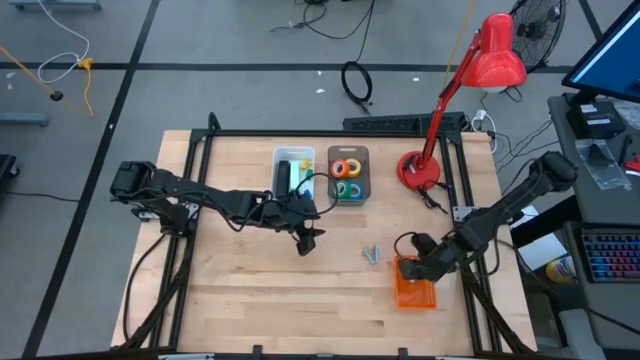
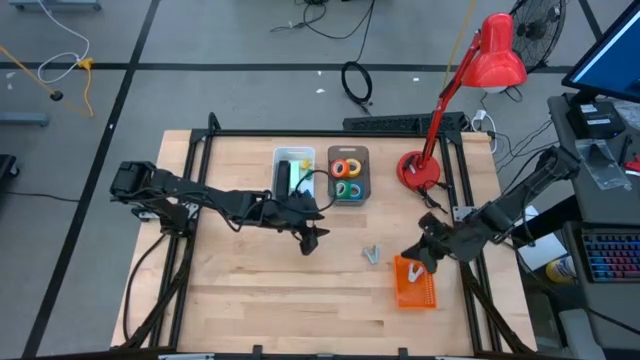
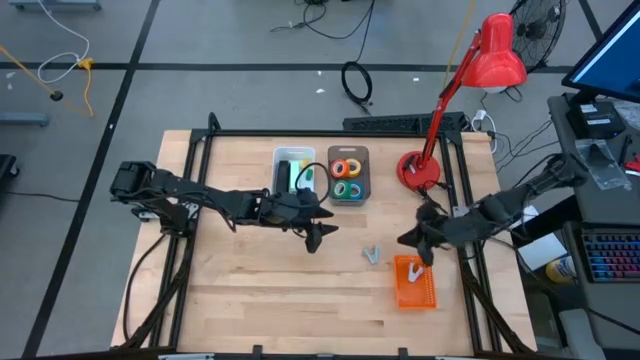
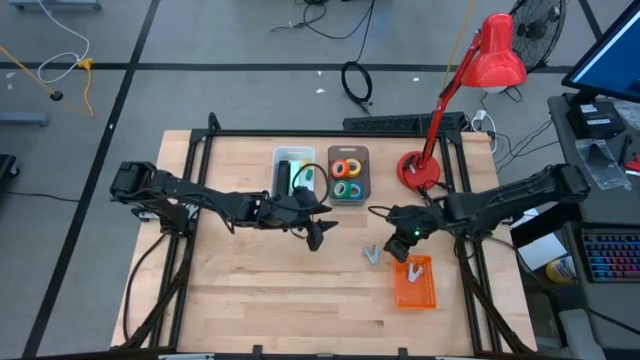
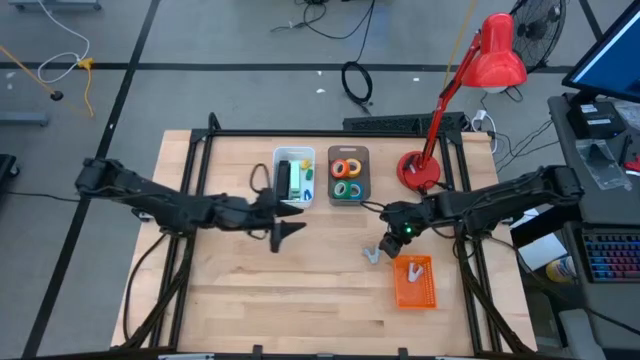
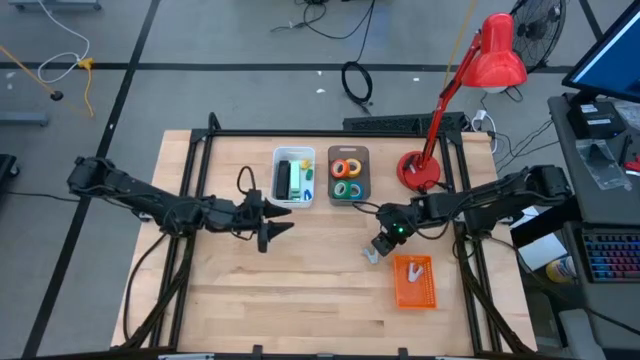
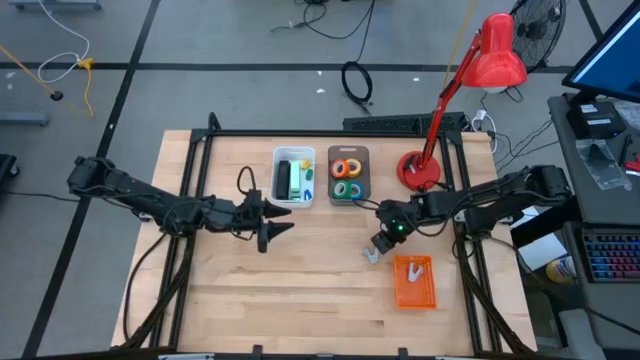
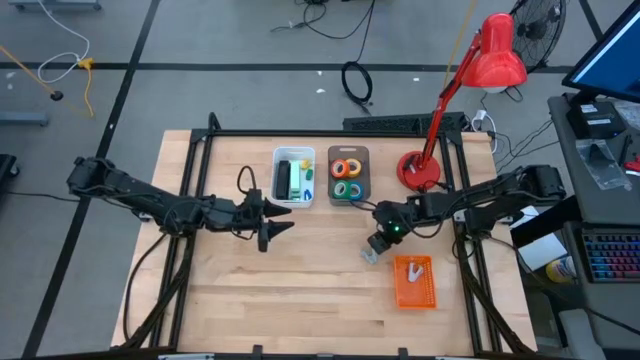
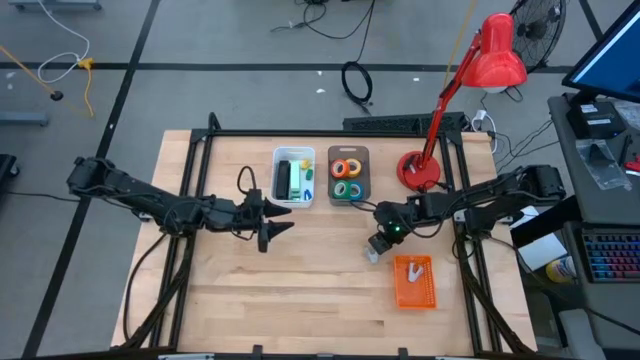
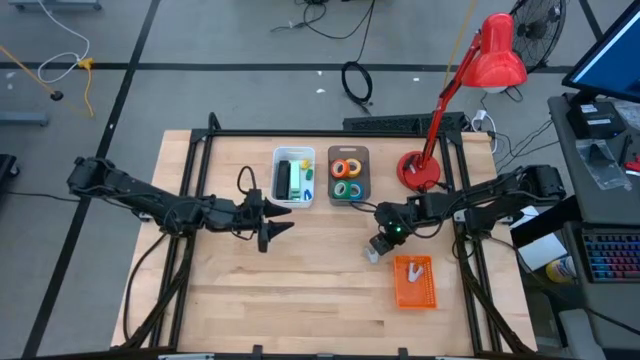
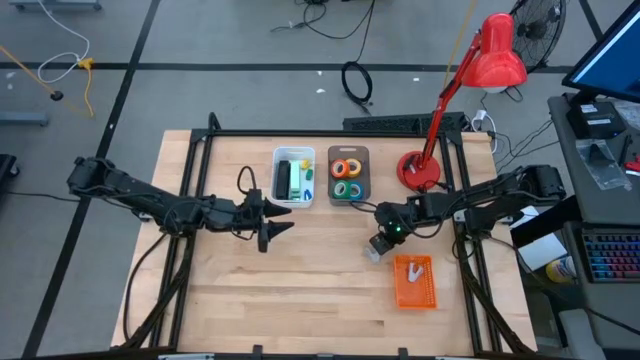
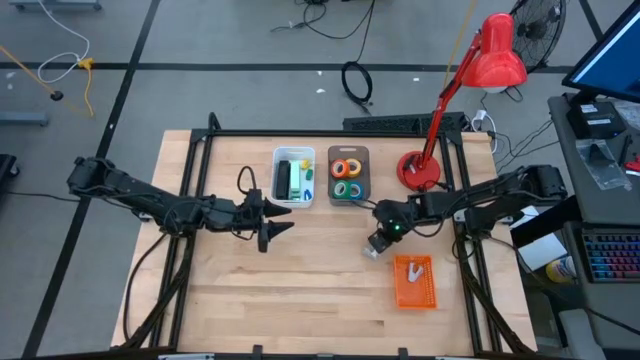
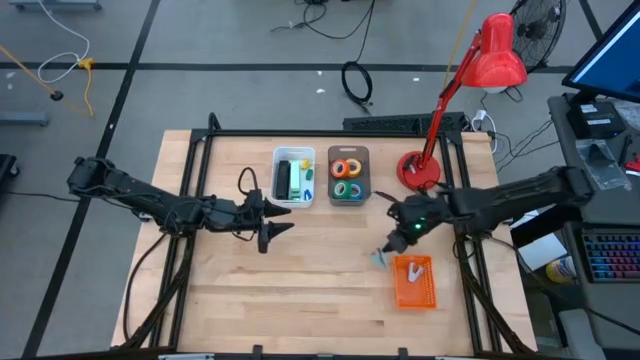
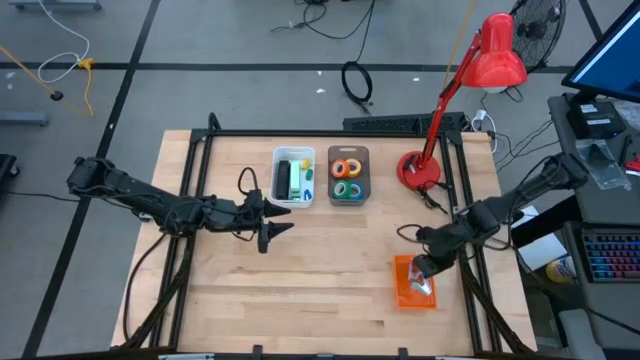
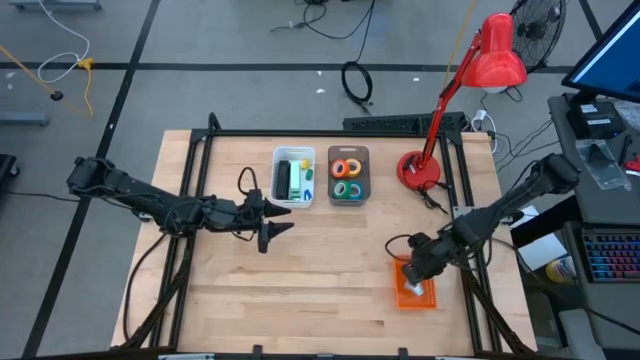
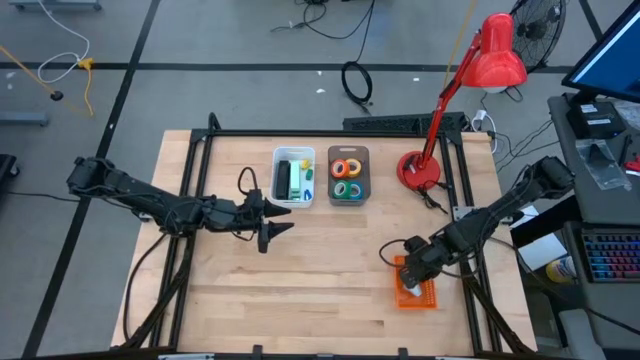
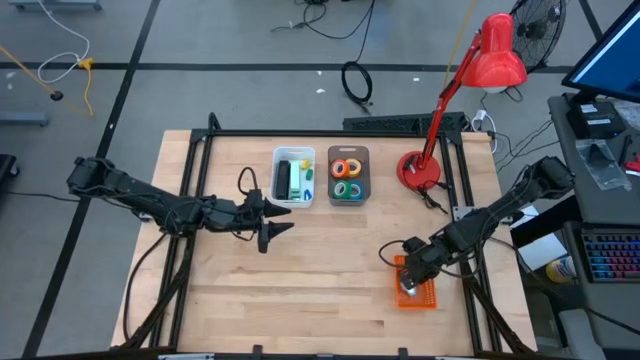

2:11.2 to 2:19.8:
Task: Pick and place Stapler, Stapler remover, tape
Put the blue staple remover into the orange bin

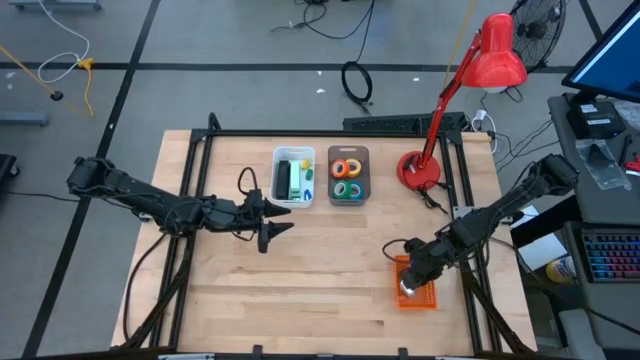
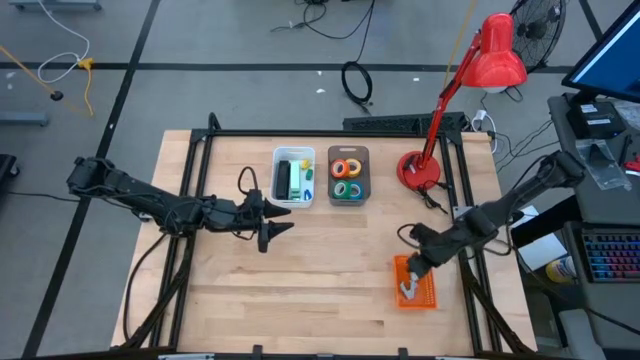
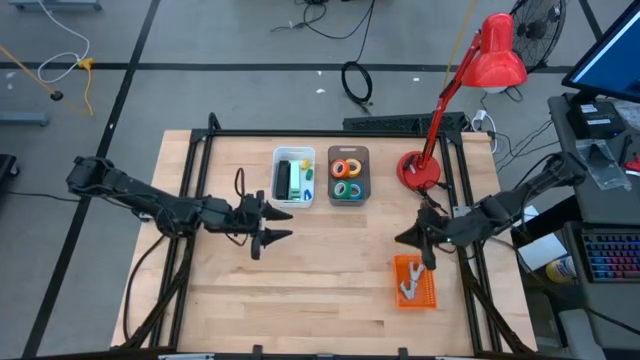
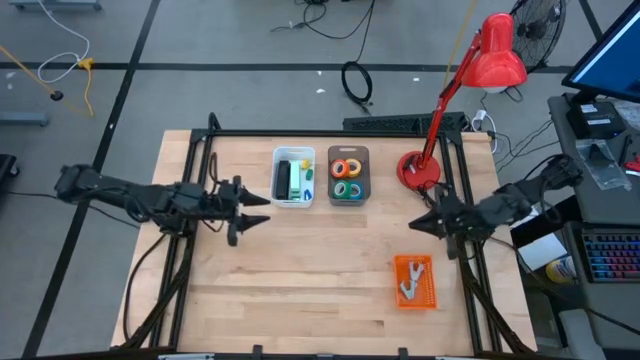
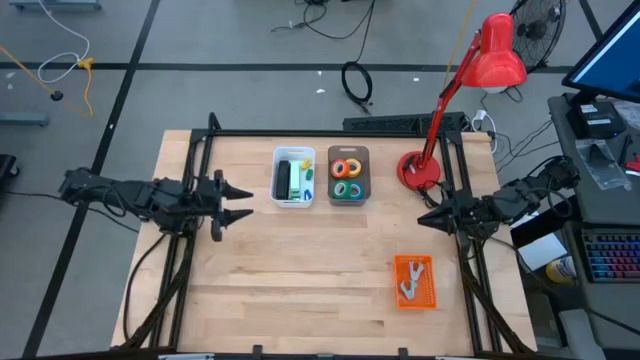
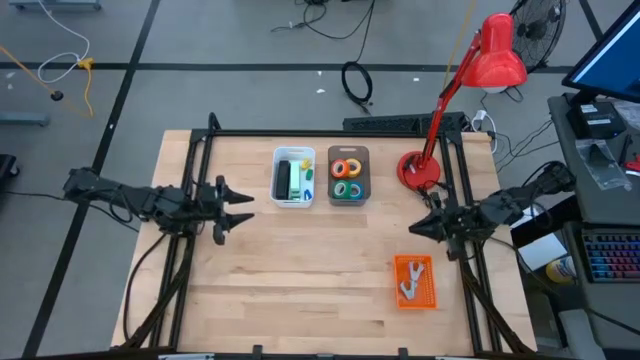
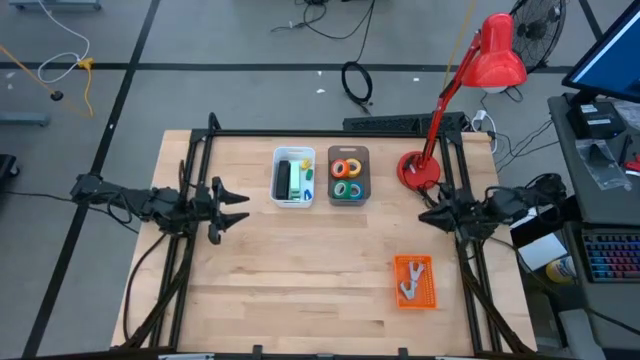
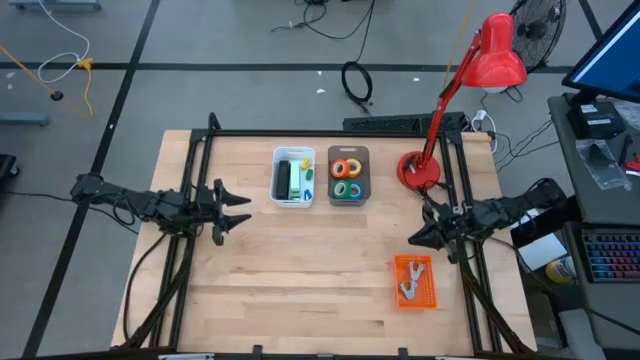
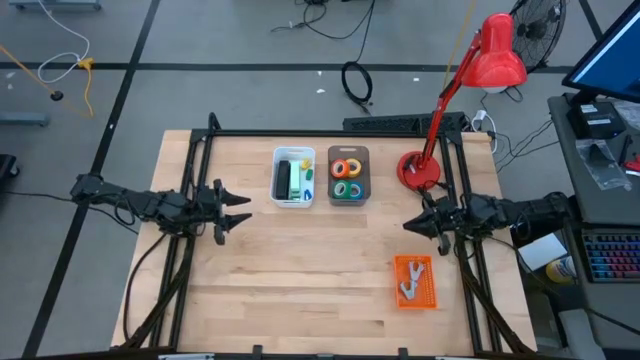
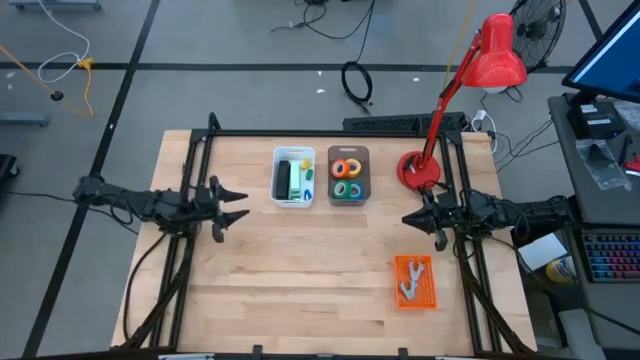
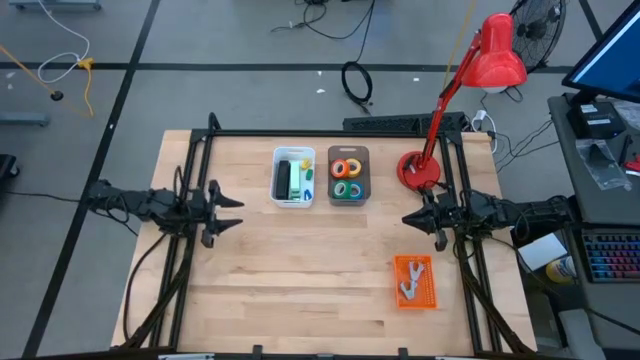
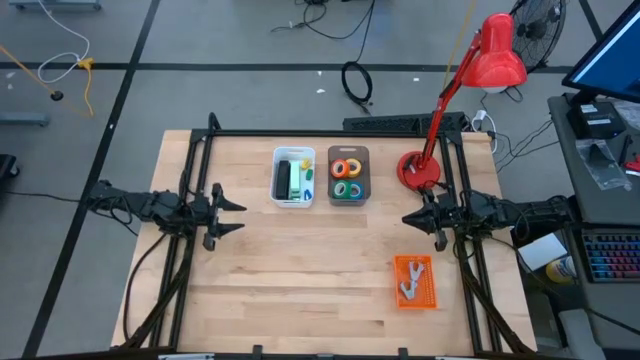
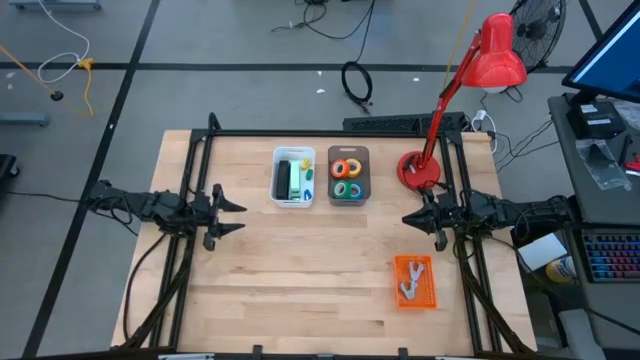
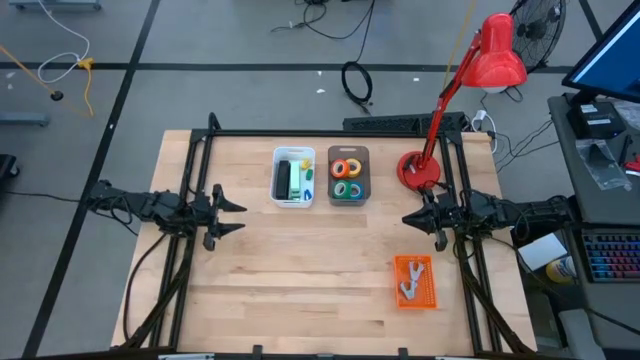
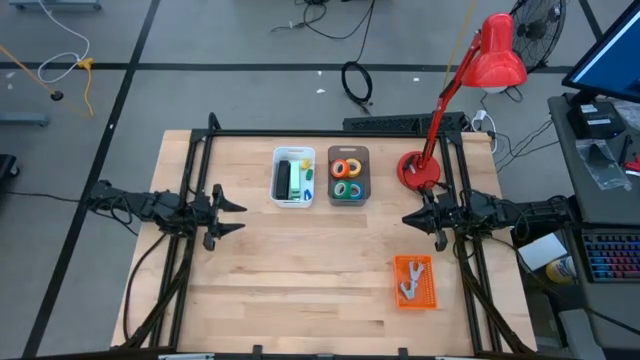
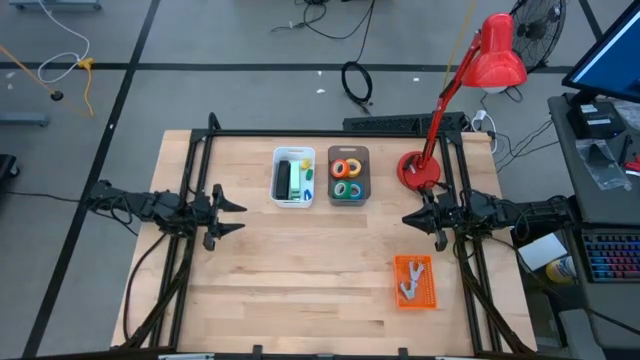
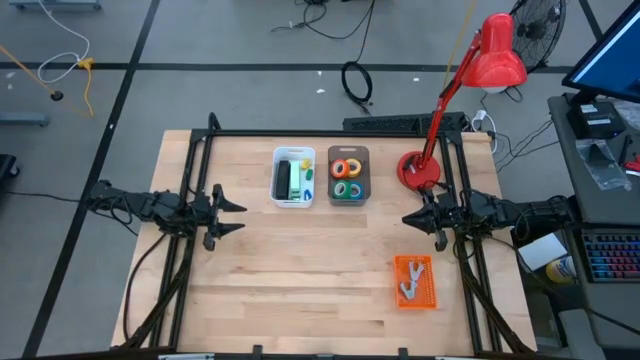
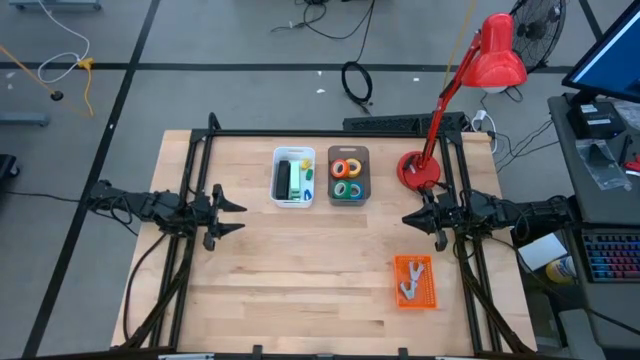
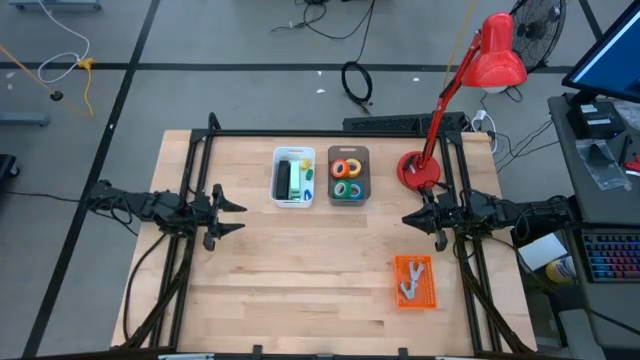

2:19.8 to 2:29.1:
Return to Home Position

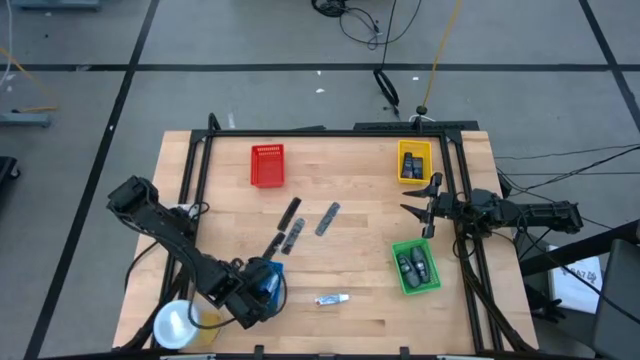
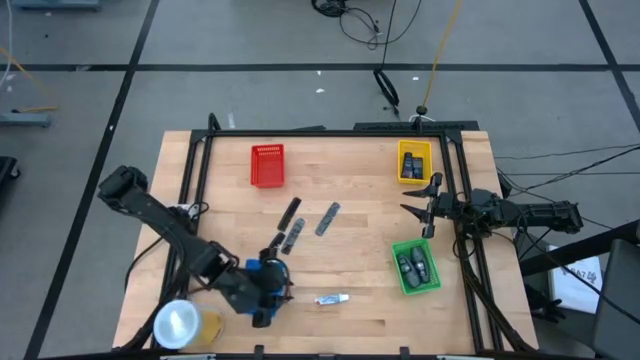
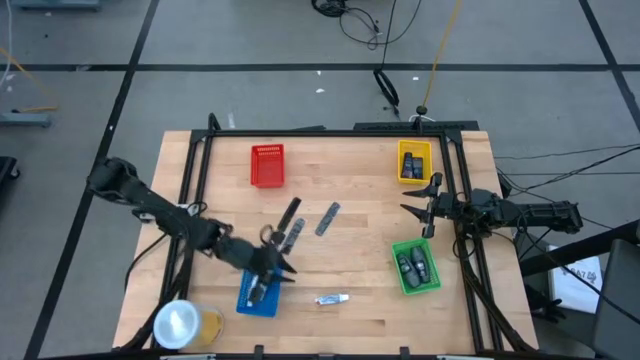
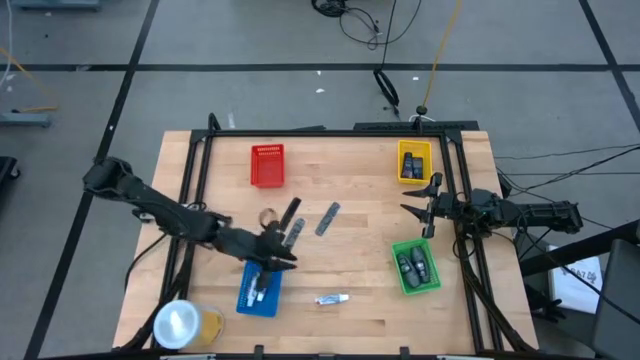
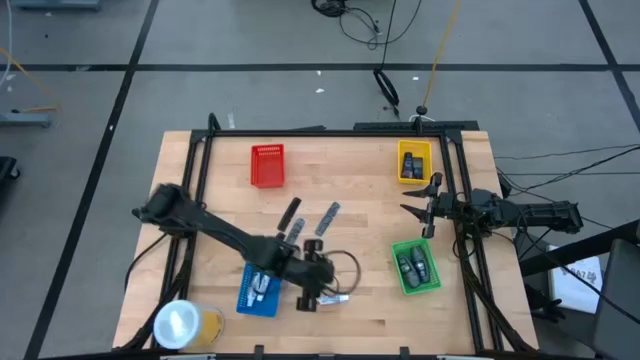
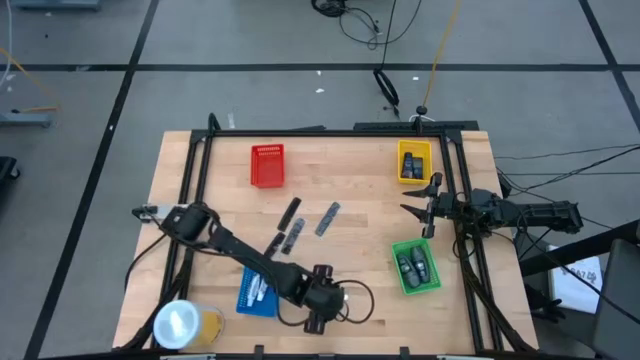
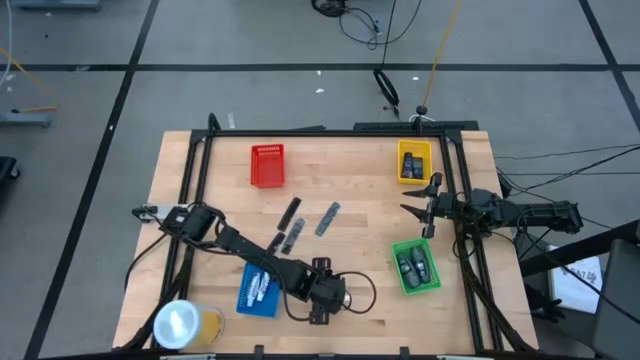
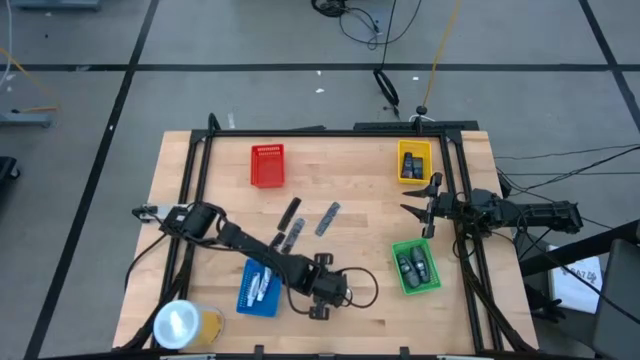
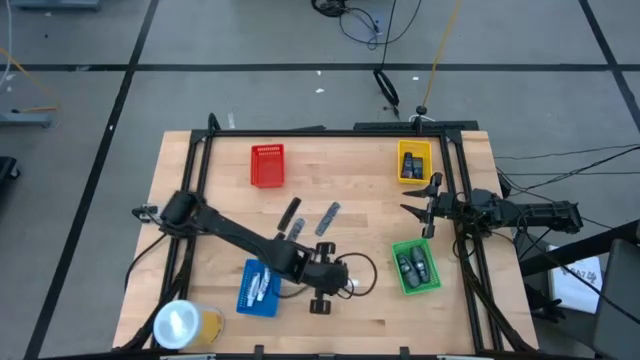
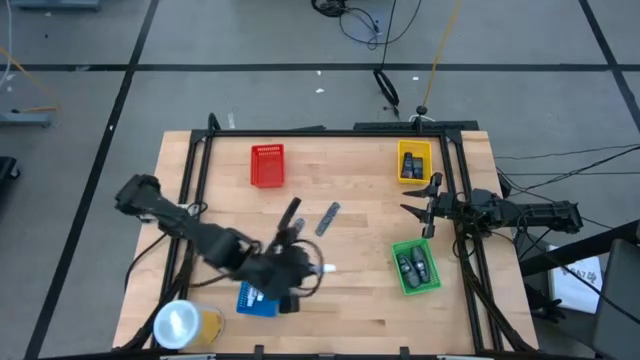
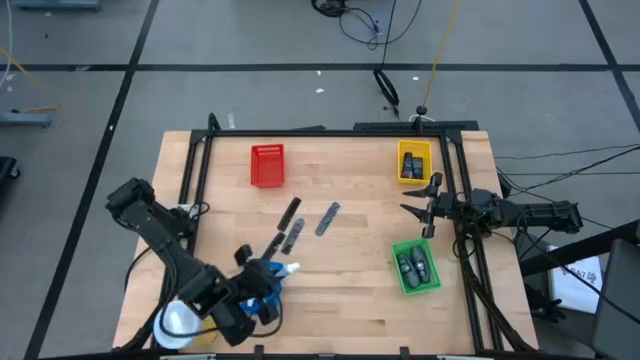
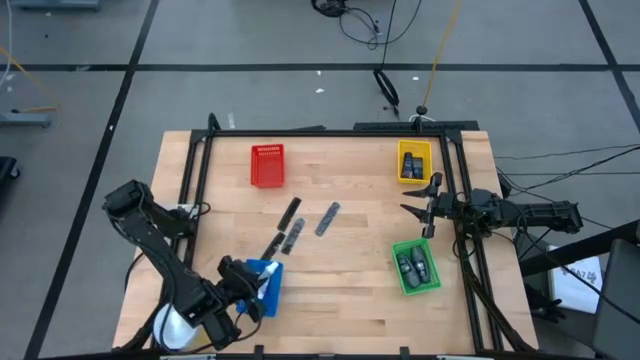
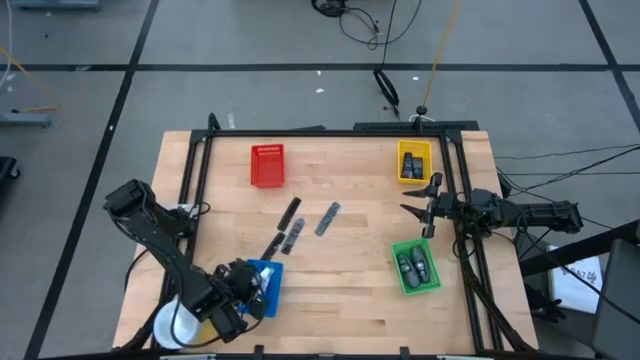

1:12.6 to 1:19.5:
Task: Pick & Place Travel size toiletries
Put the white purple toothpaste into the blue basket
